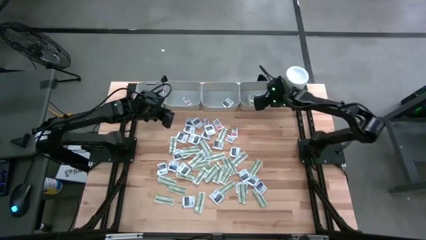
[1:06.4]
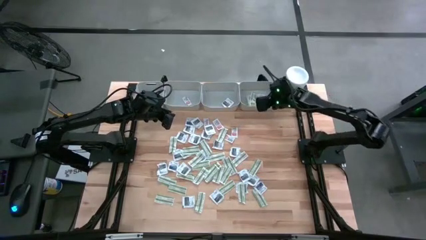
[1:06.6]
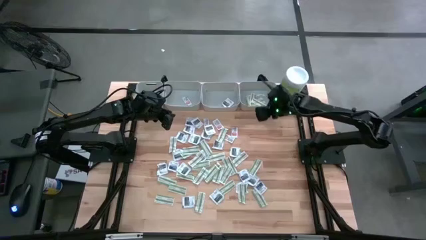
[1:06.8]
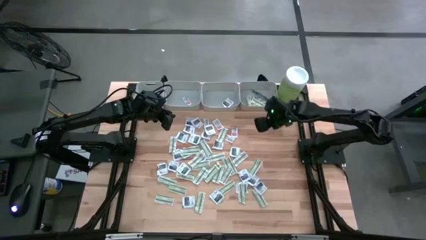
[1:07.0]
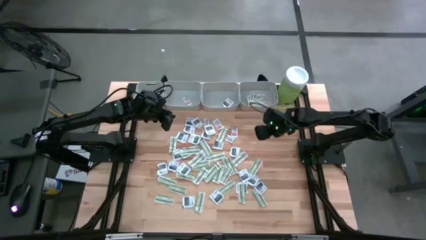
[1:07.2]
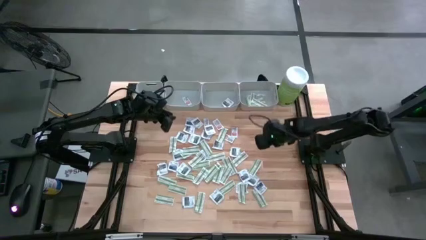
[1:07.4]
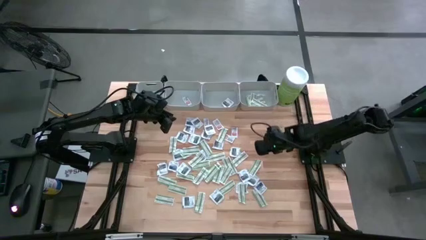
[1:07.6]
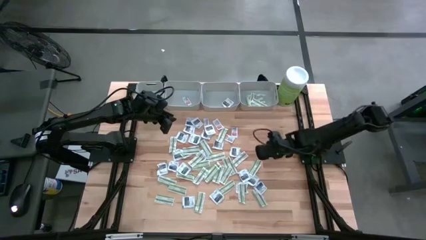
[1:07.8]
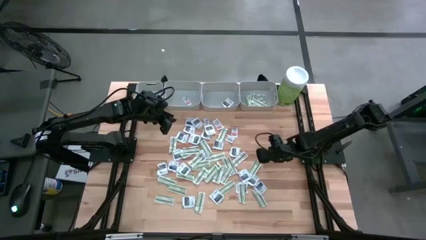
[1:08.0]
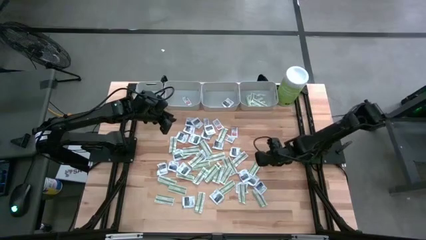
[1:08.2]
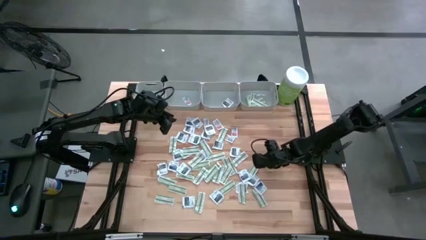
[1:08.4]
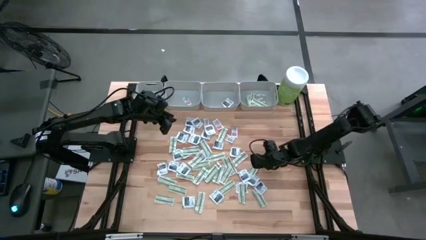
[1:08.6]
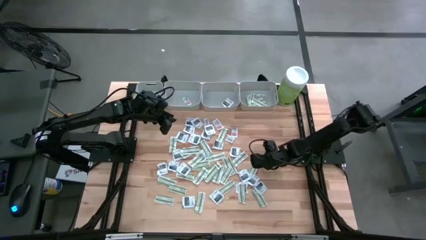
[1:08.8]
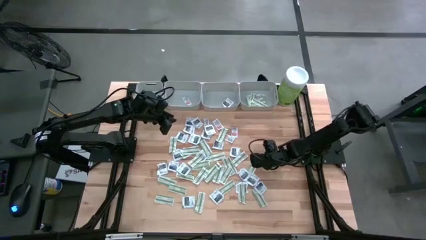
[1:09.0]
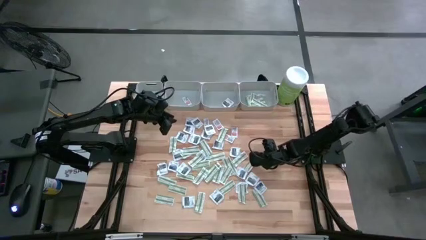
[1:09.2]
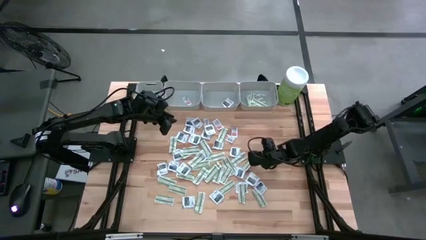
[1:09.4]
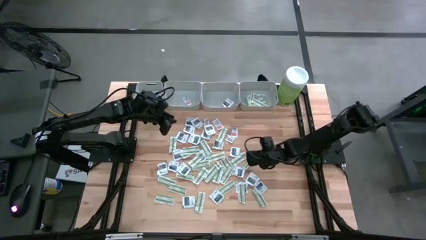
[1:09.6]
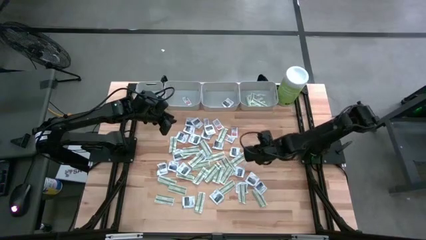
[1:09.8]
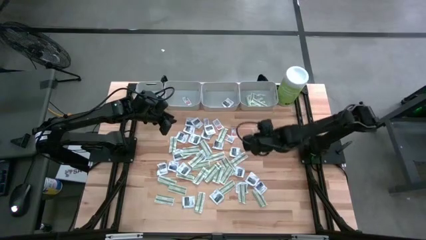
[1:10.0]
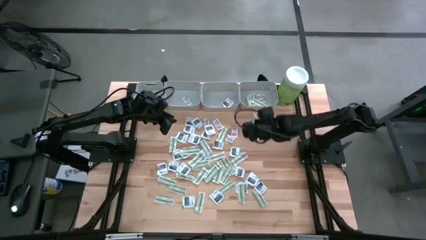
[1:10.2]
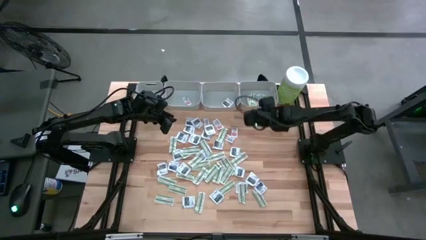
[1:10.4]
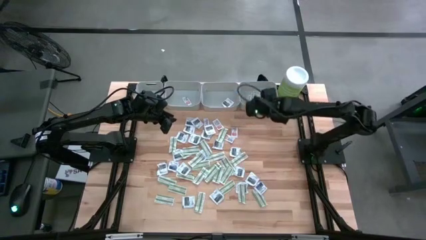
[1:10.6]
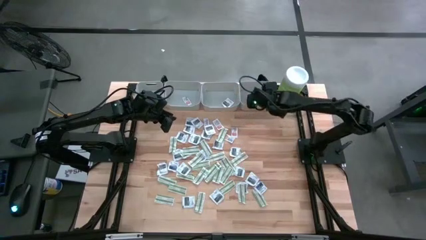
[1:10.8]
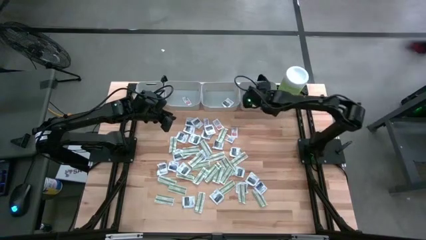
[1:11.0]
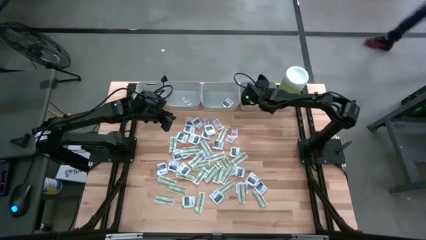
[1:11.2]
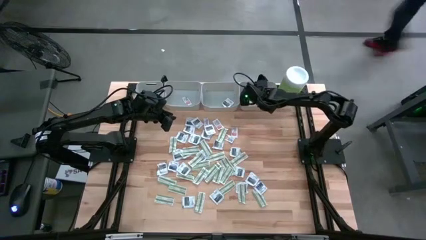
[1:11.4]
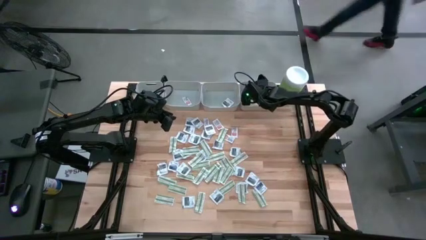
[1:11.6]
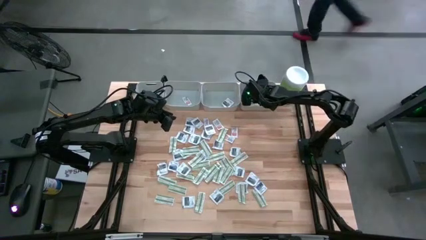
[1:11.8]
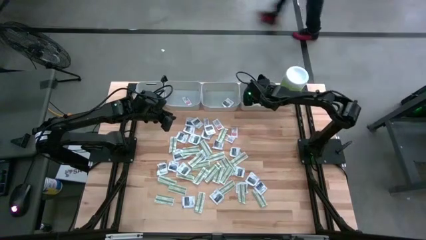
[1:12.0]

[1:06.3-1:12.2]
Task: Pick & Place First Aid Supplies
Put the green bandage into the right gray bin

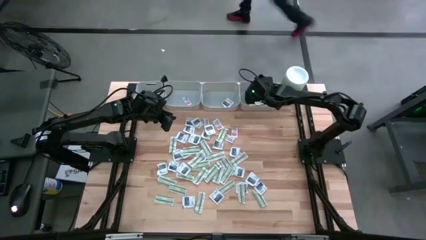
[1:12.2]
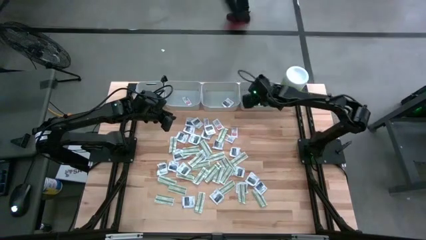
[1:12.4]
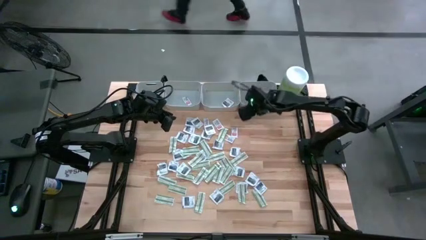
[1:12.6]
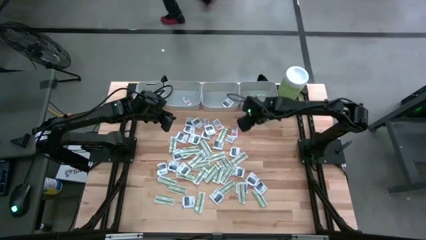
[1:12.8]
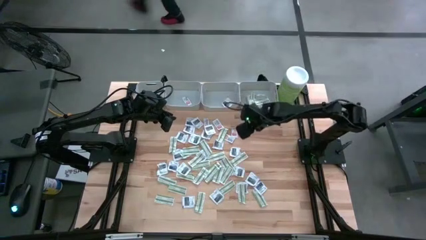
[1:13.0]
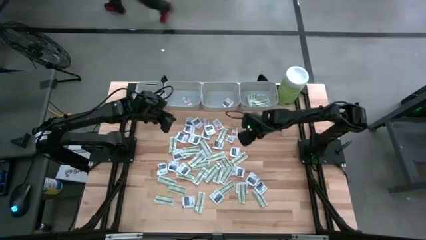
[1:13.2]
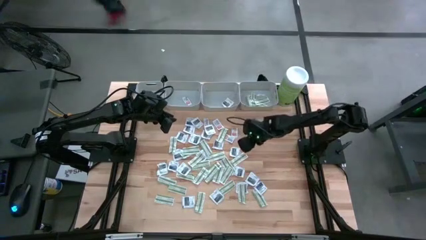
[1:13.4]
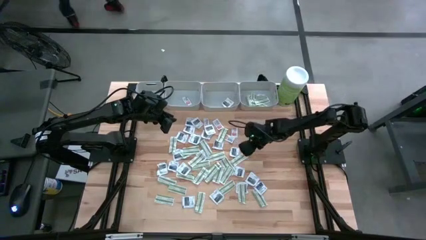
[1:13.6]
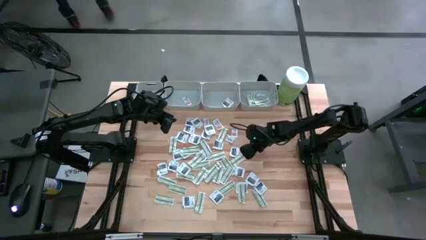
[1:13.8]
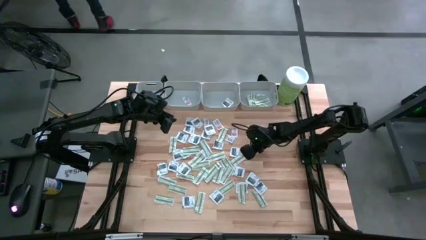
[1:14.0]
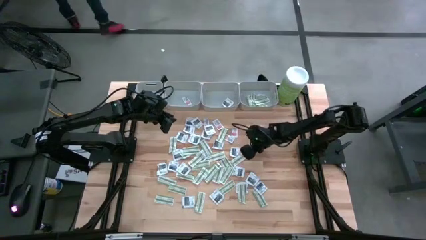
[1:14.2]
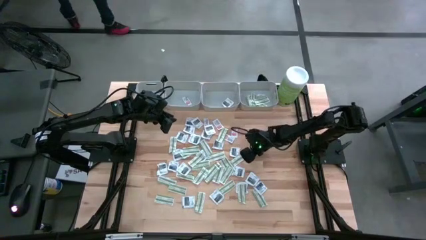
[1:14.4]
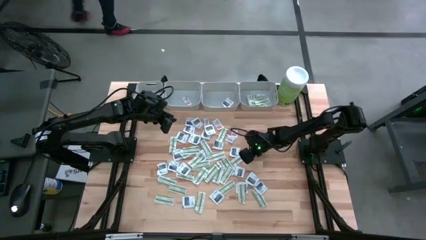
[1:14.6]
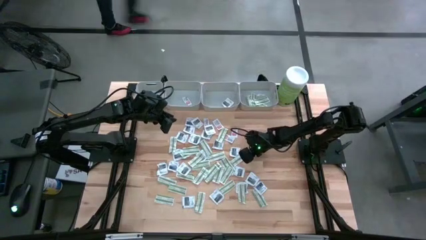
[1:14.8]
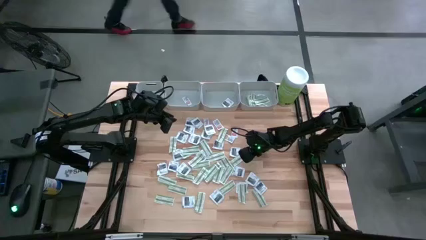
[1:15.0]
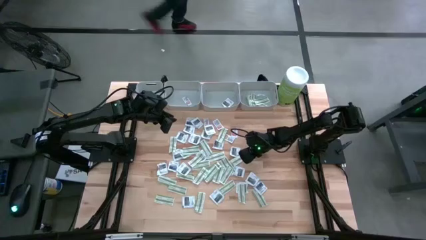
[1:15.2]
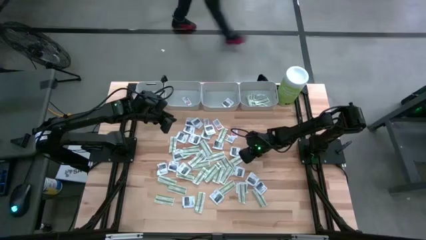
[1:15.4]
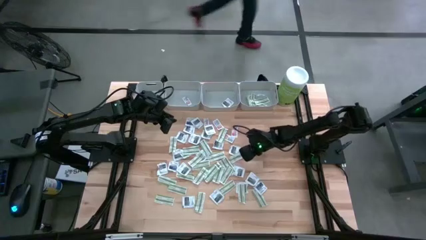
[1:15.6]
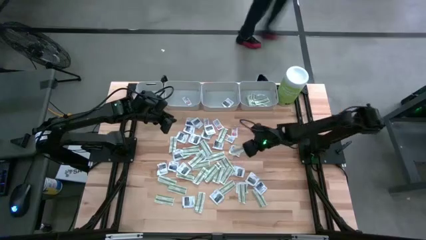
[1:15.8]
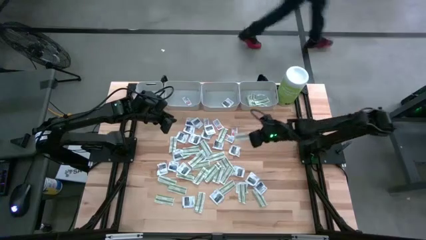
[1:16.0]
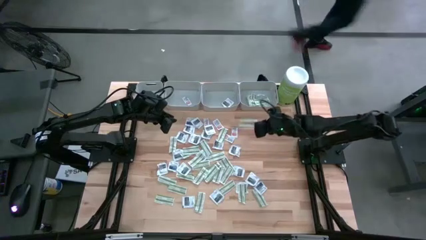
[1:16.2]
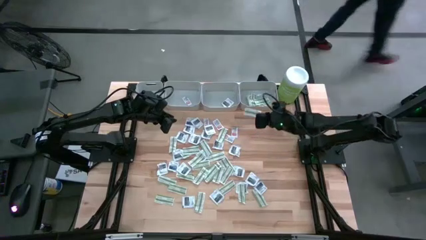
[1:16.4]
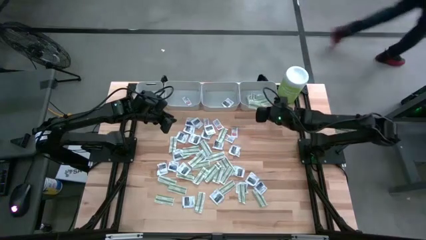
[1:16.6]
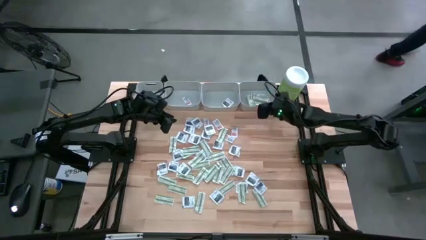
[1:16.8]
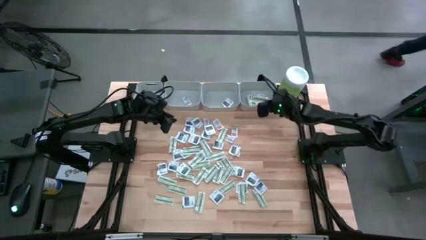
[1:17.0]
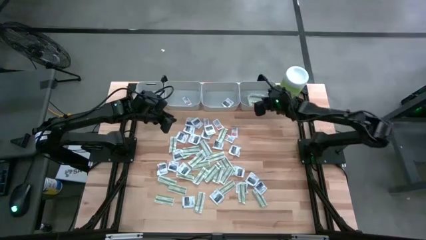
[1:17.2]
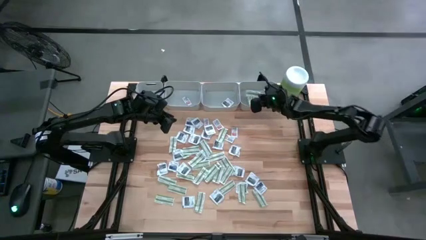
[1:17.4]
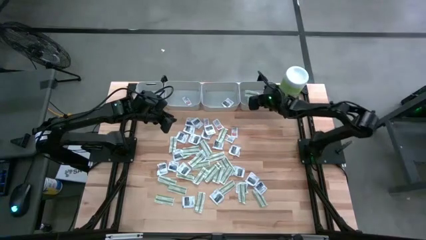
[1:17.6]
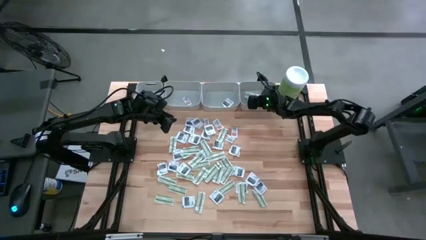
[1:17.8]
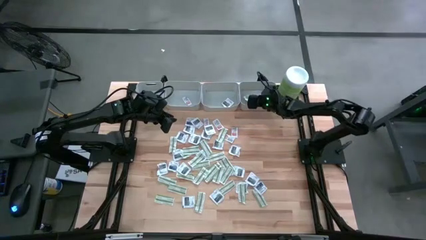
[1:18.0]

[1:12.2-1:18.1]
Put the green bandage into the right gray bin

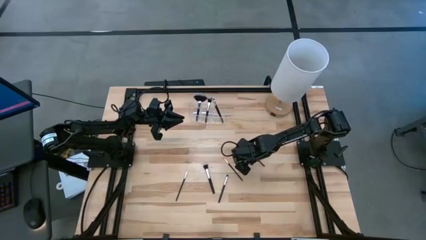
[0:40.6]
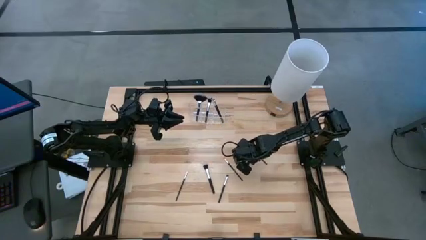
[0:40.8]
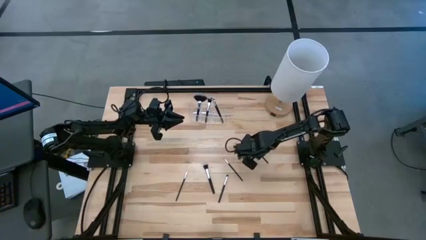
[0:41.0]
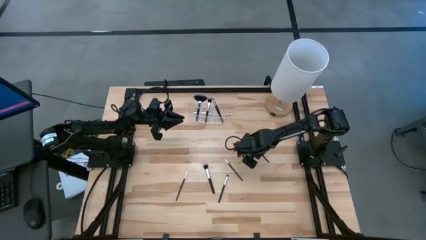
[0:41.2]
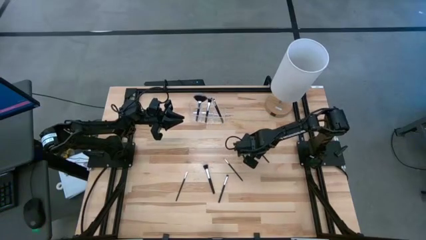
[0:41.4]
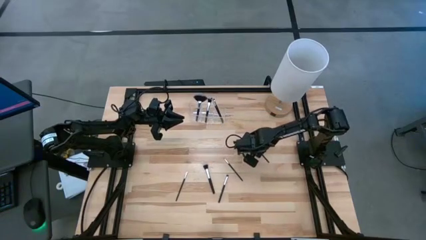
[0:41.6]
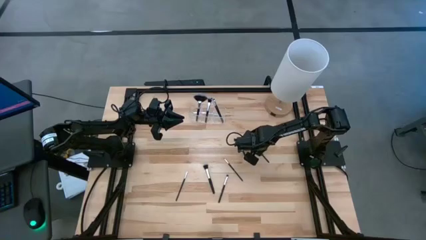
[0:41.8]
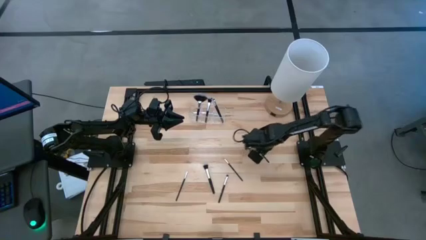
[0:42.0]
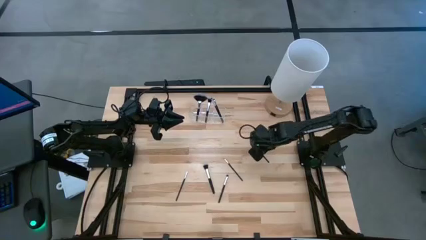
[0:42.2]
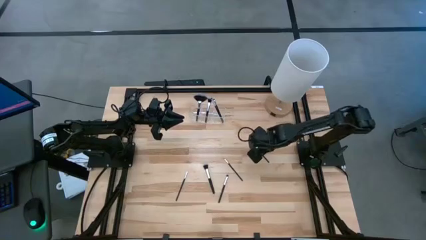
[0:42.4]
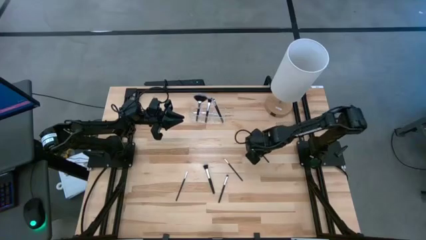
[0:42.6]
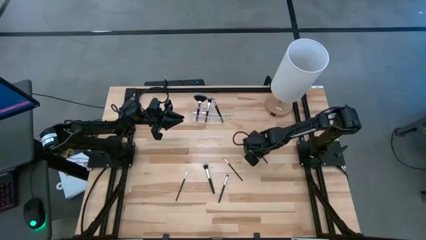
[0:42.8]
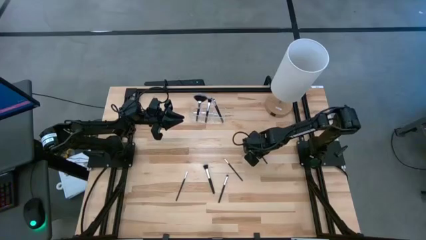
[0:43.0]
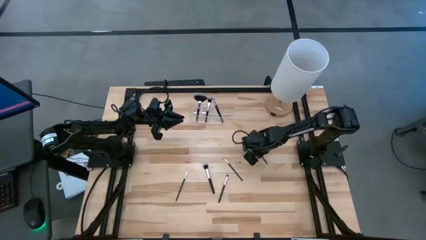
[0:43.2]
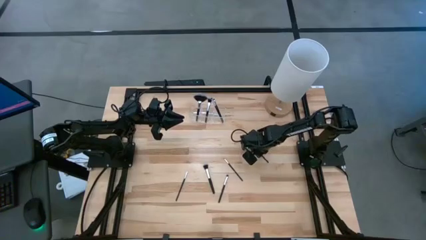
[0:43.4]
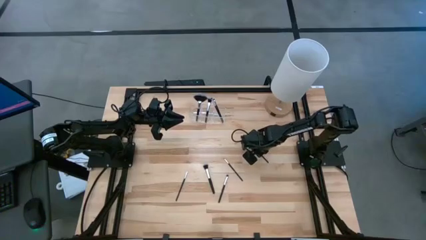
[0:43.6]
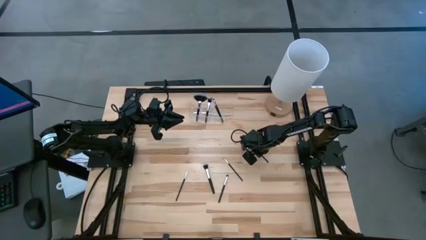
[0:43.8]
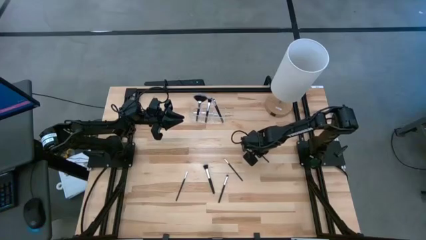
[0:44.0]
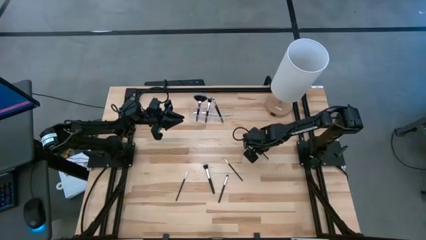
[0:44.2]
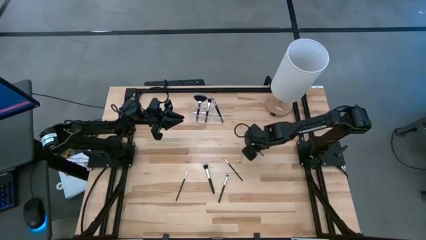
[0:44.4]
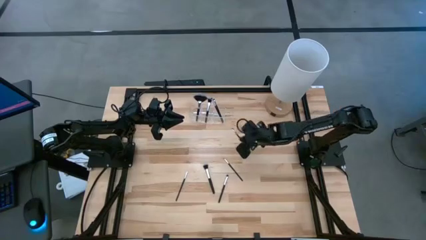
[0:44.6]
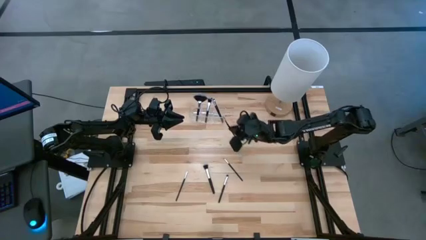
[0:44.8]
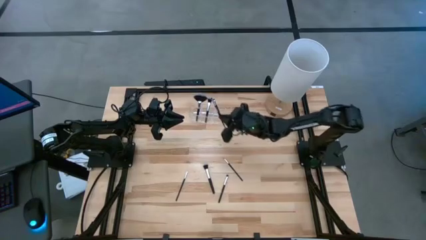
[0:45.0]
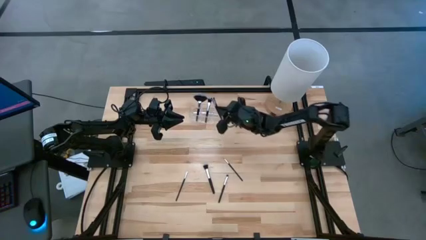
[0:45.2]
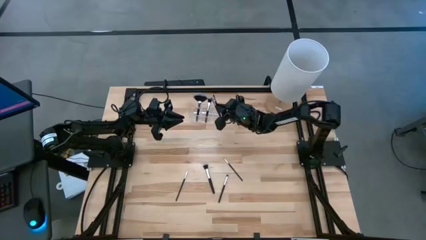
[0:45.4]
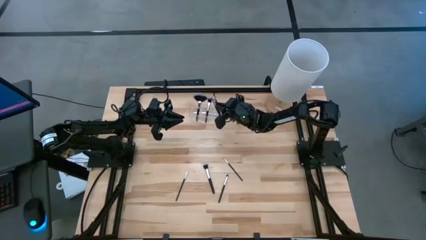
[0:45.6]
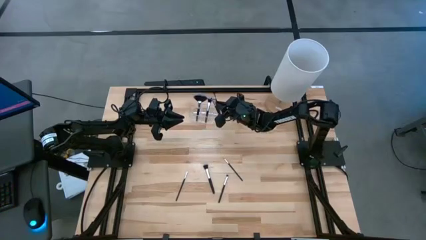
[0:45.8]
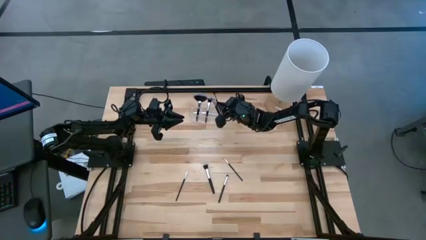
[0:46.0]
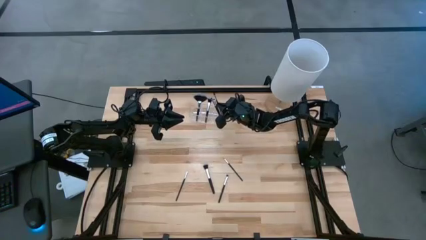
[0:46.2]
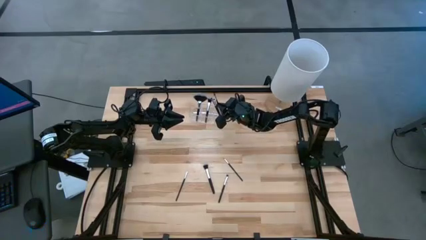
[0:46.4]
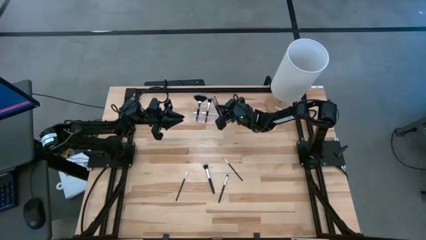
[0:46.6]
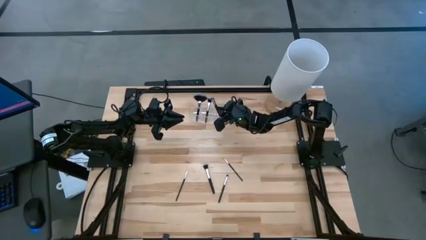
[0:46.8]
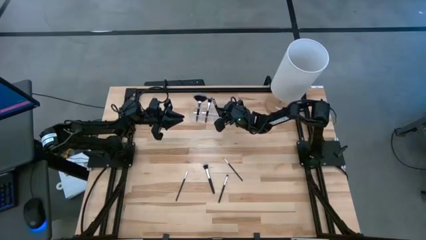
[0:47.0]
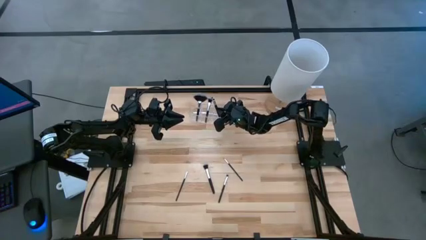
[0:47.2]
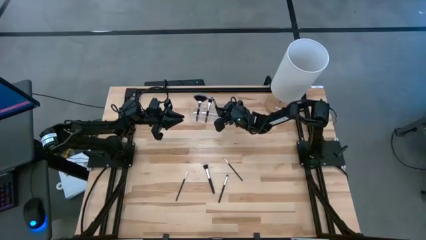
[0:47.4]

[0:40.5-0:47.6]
Task: Pick & Place Makeup Supplies
Put the makeup brush into the transparent organizer
